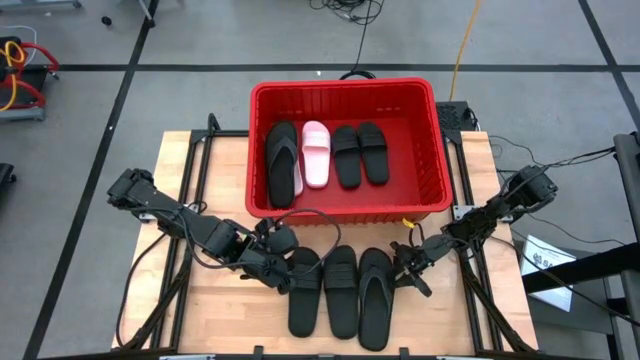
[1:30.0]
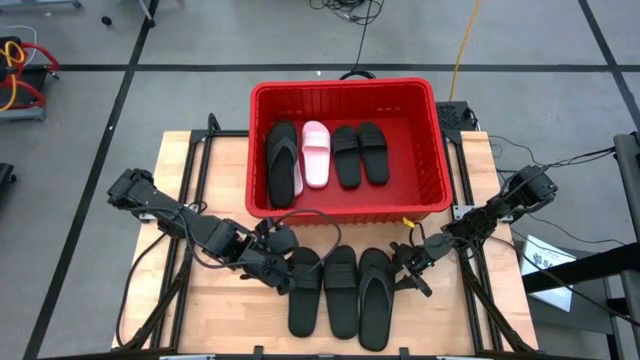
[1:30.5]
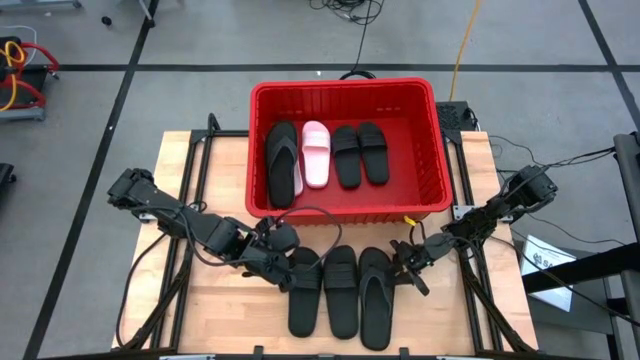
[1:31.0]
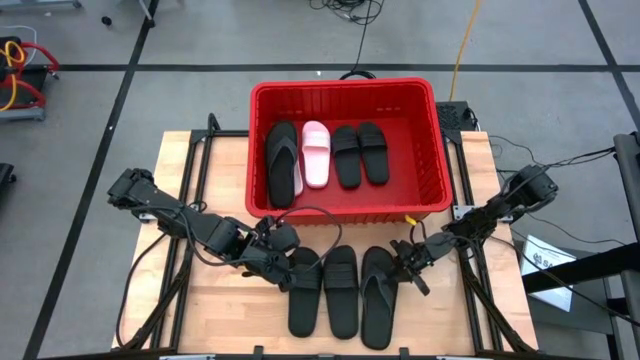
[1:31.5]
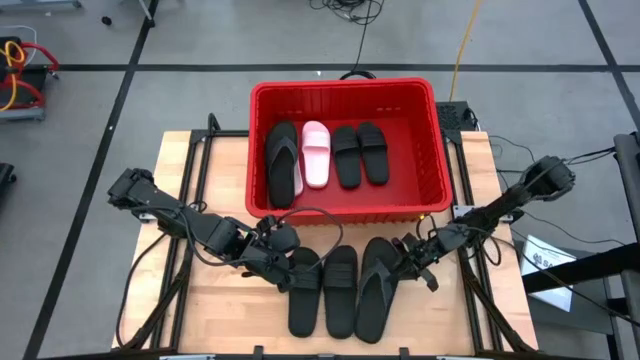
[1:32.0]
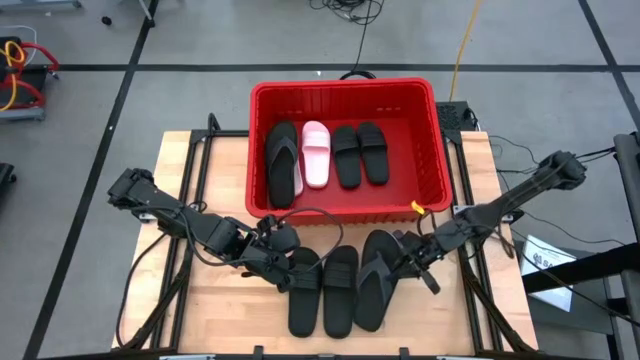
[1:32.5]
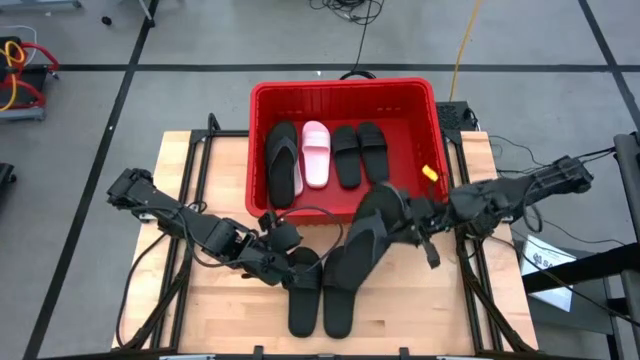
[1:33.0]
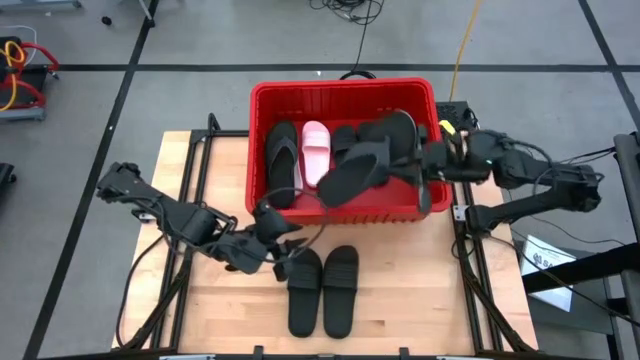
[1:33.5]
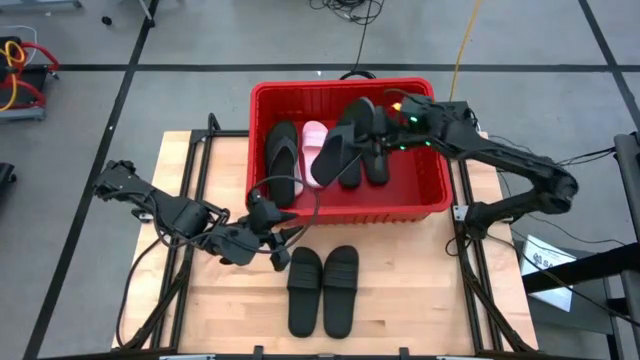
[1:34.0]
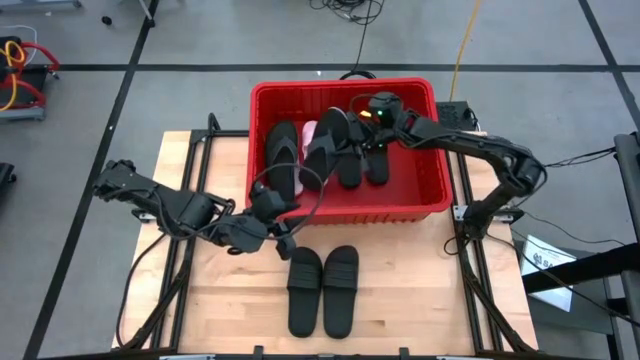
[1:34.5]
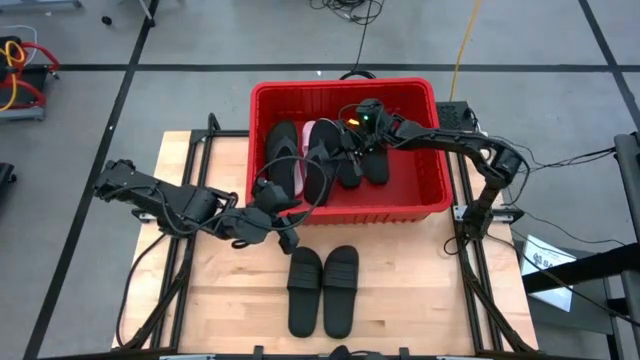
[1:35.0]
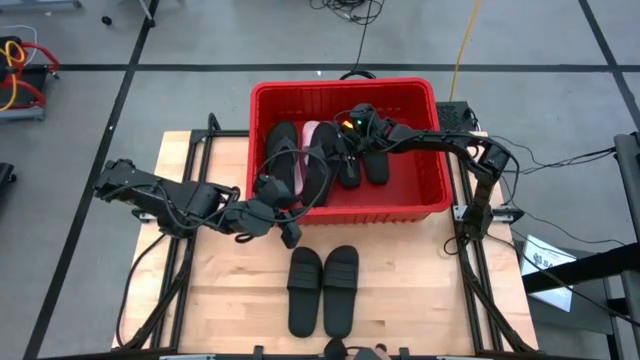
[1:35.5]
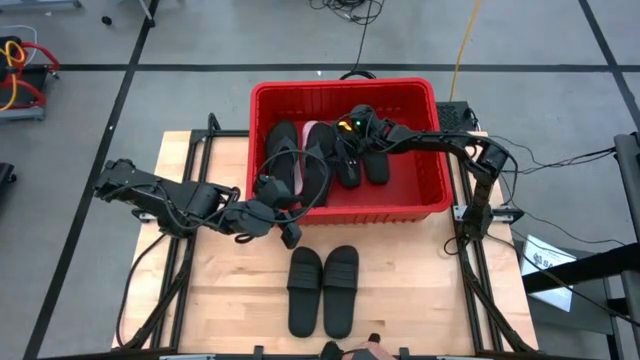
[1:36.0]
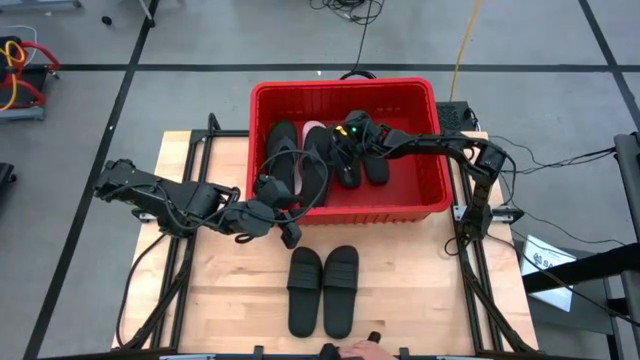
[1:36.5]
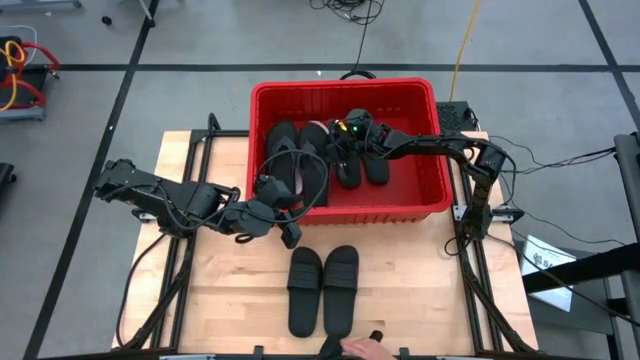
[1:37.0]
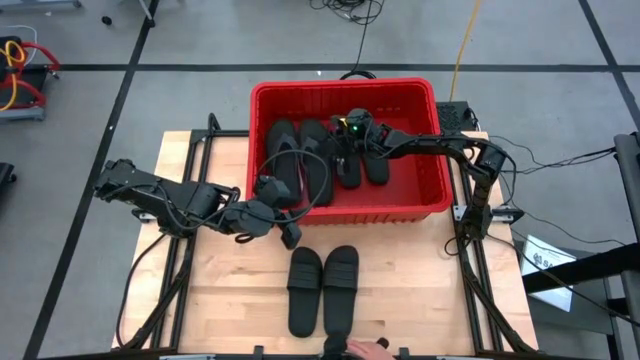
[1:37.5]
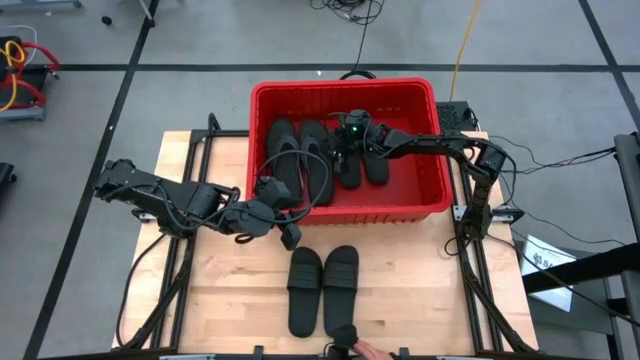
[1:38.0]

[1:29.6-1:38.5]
Task: Pick and place slides into bin
Put the black slipper into the red bin

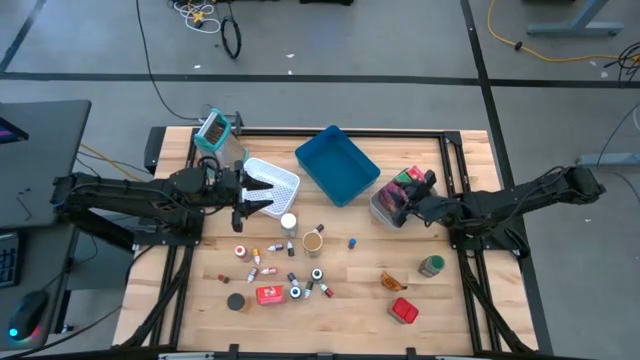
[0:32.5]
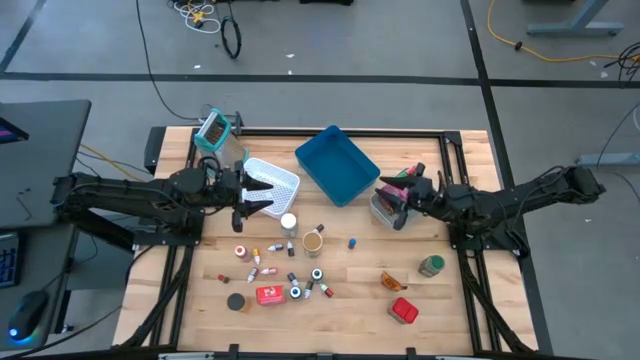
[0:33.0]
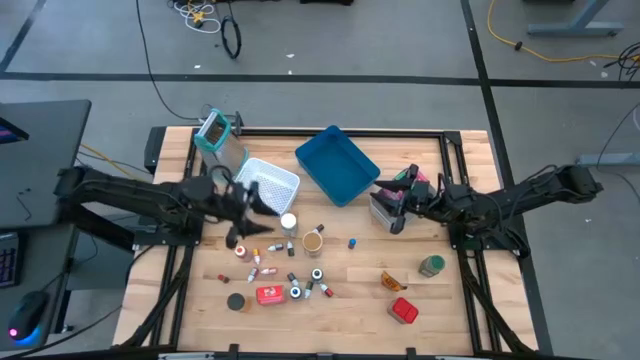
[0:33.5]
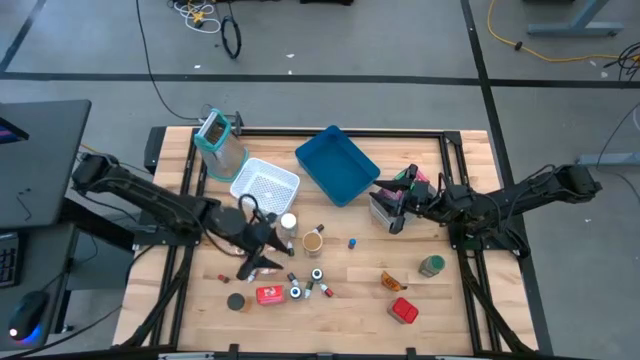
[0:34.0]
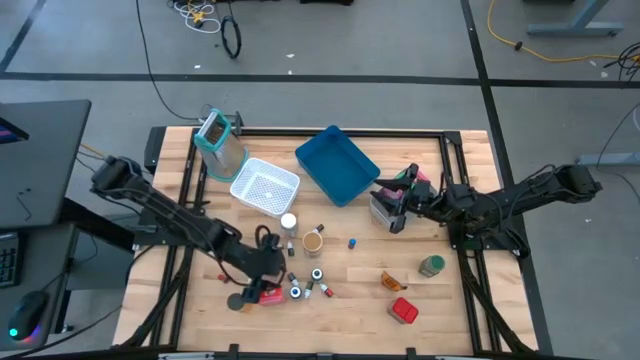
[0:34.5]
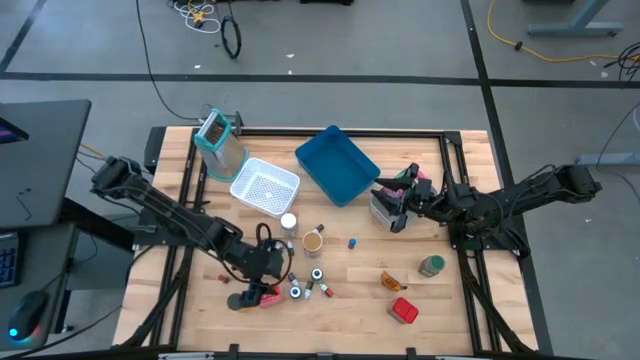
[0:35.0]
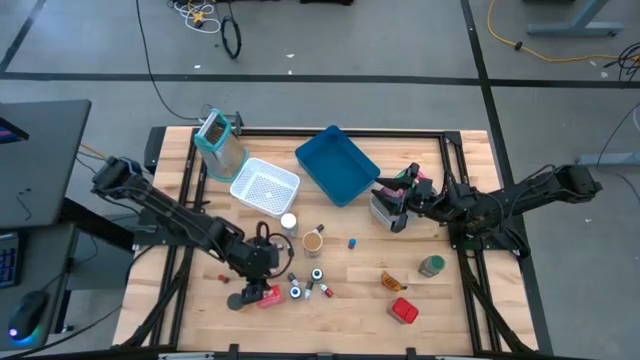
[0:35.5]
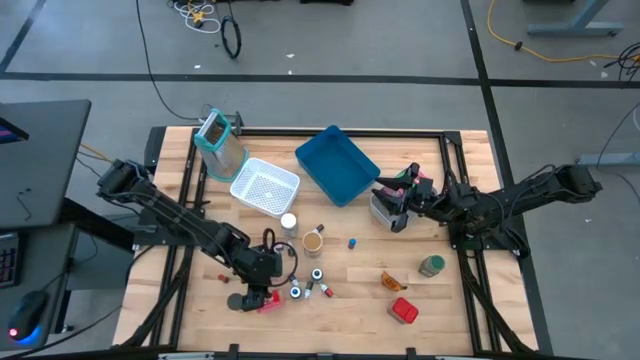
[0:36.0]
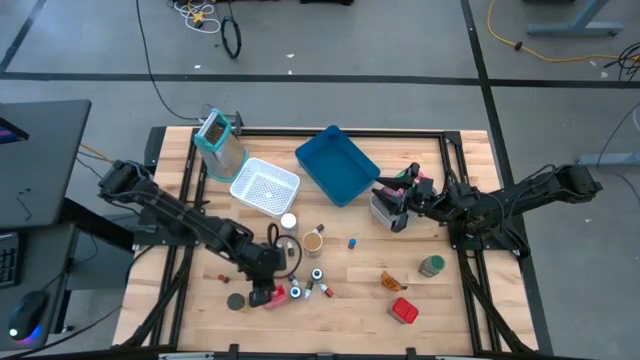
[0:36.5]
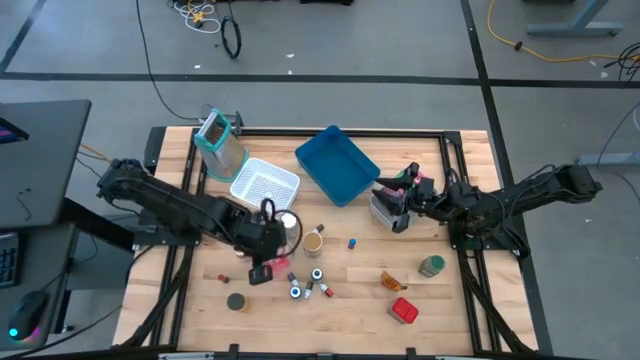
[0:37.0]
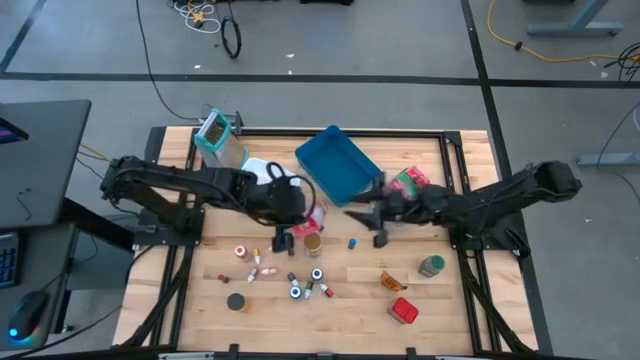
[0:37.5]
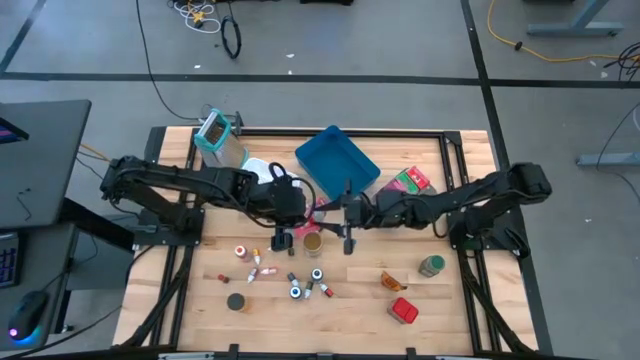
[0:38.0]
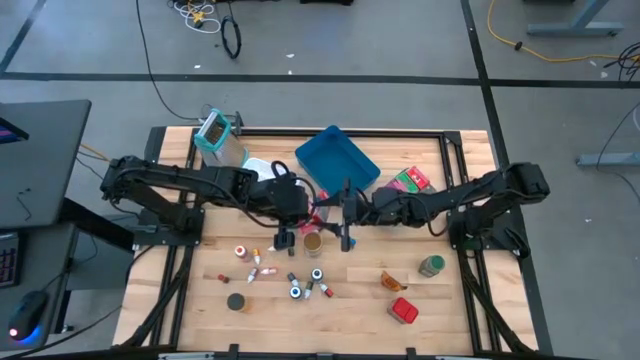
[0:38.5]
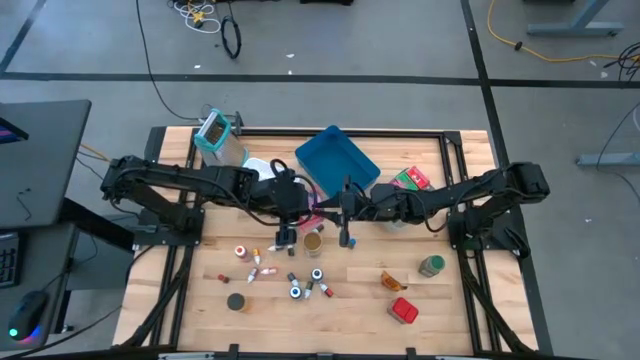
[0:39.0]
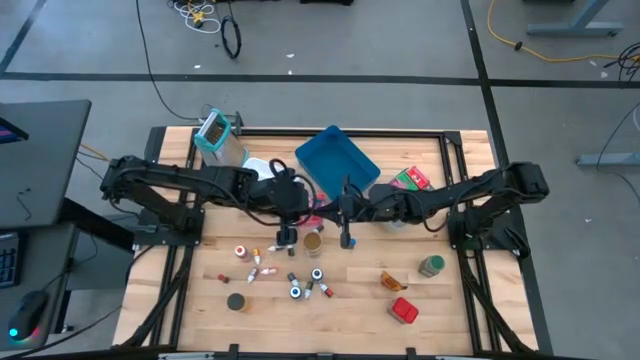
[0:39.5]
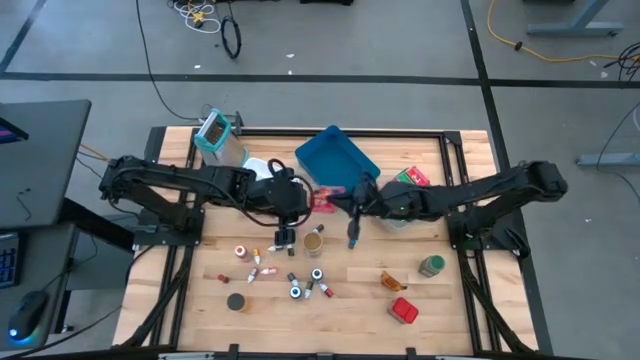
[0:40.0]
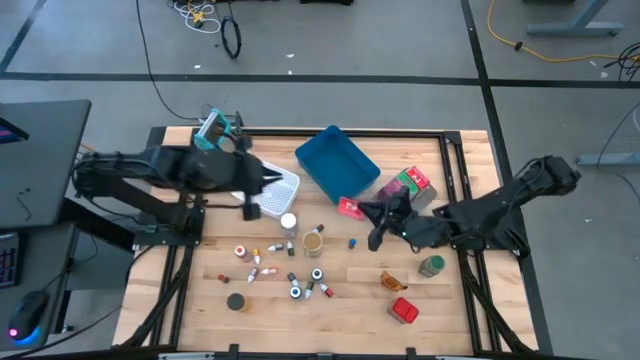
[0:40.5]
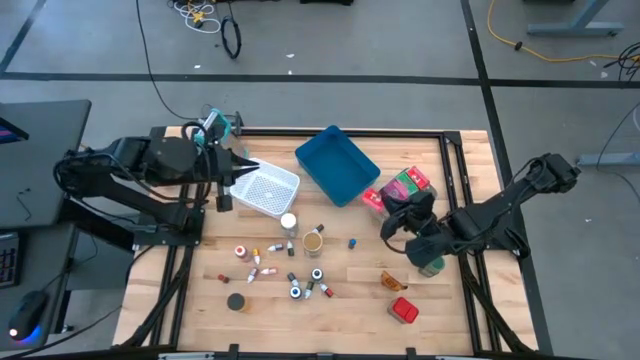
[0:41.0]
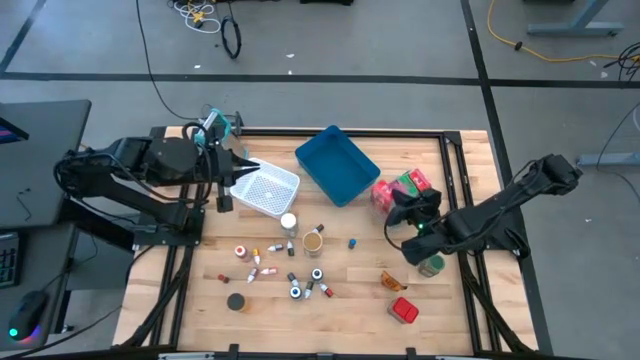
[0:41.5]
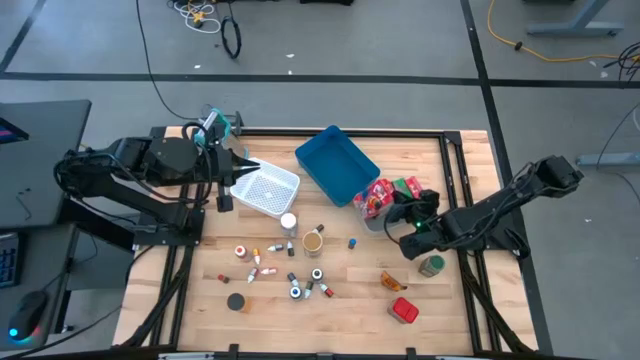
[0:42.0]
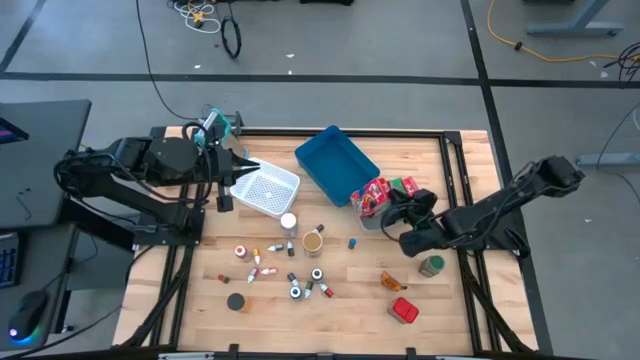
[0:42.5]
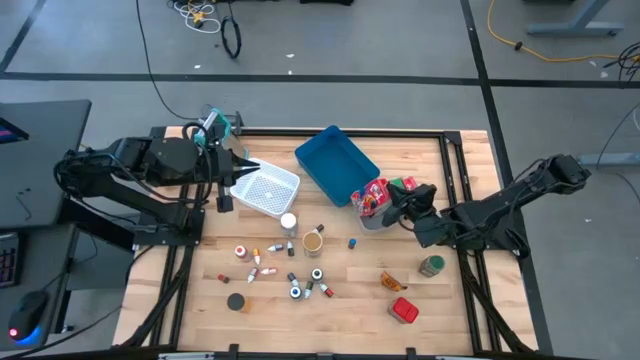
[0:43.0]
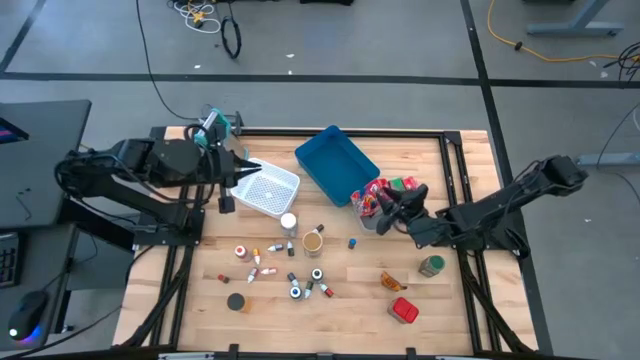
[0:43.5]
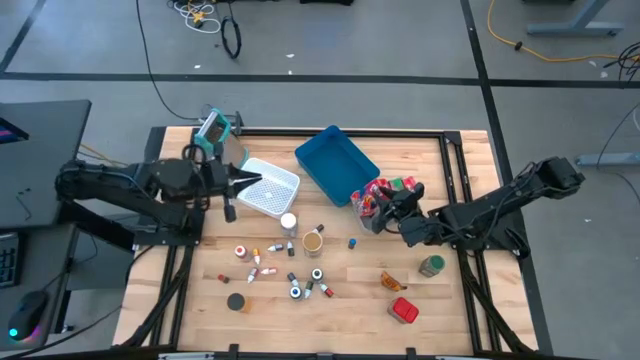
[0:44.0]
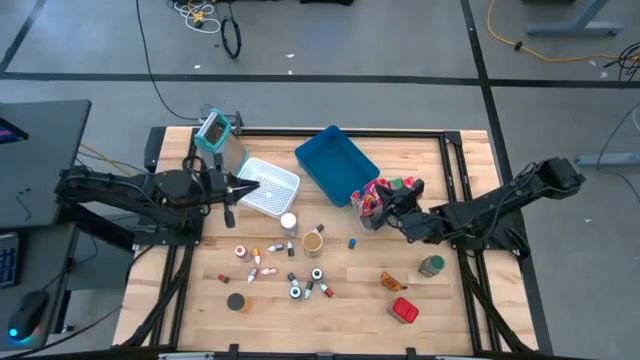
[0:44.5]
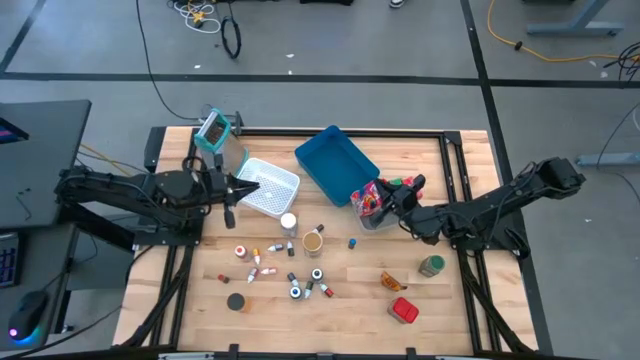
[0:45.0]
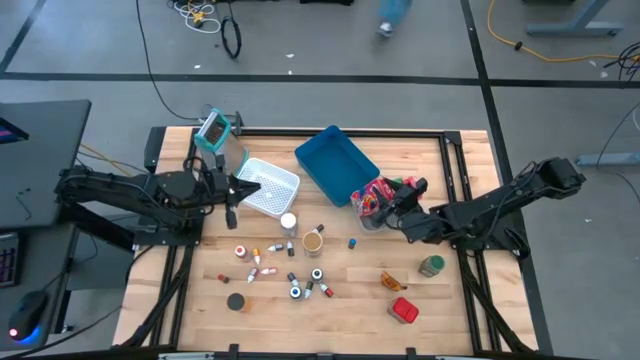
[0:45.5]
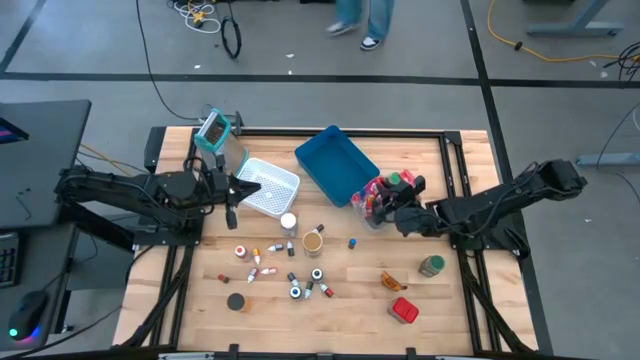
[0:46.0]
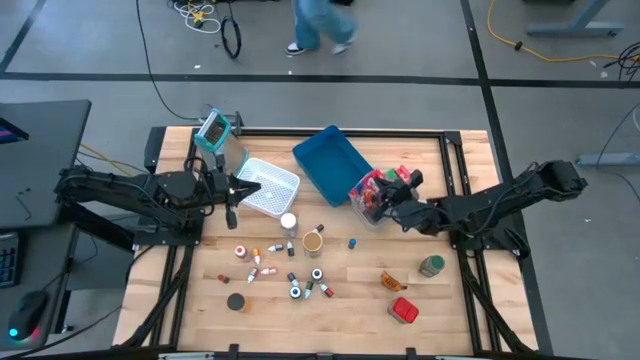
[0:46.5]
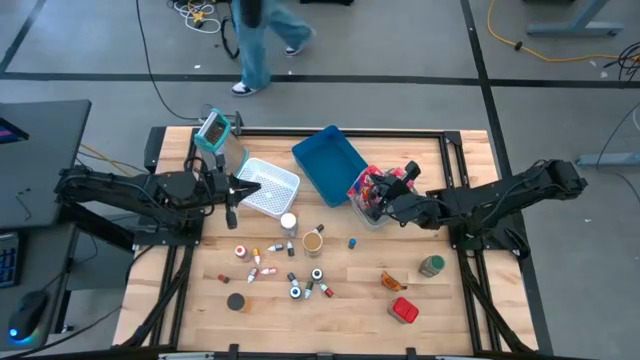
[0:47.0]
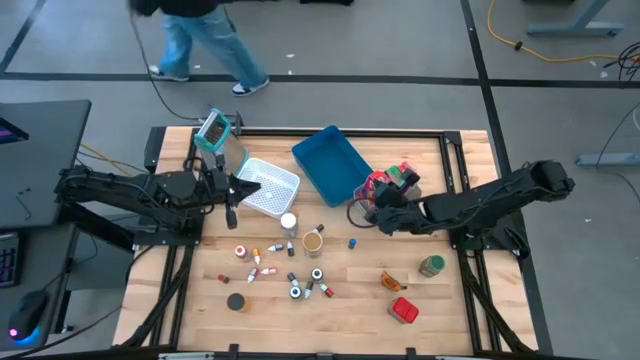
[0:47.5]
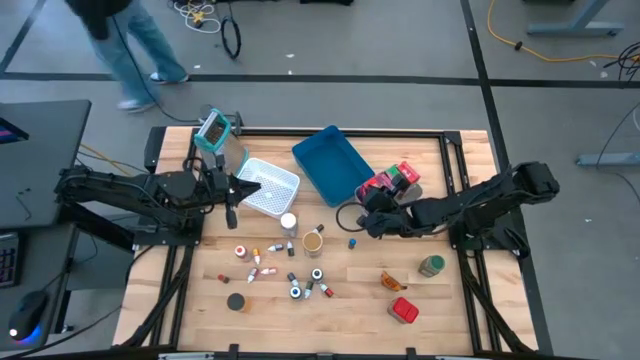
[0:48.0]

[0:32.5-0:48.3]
Task: Pick & Place Kitchen Items
Put the red cereal box into the gray bin
